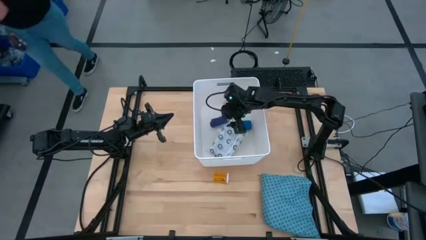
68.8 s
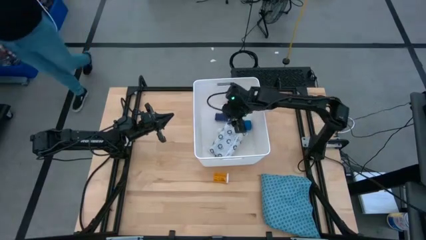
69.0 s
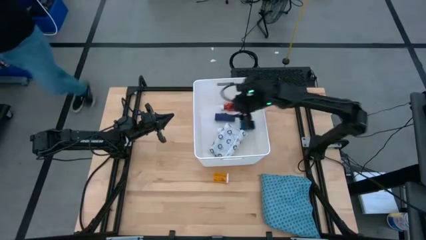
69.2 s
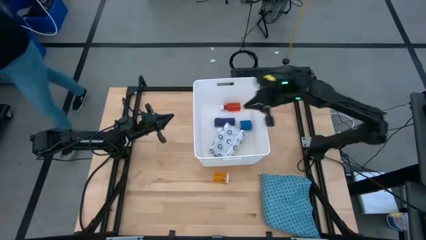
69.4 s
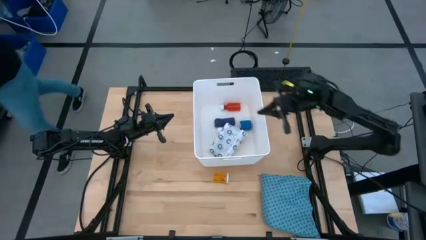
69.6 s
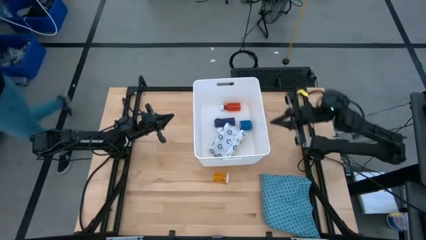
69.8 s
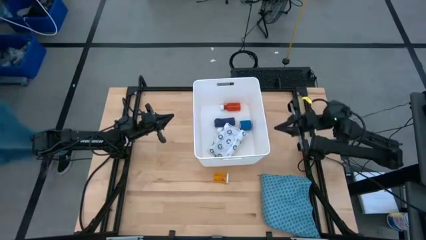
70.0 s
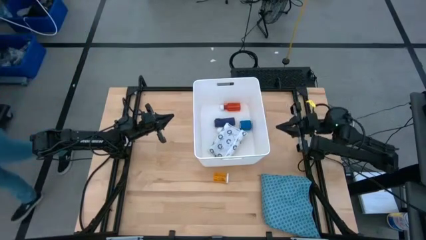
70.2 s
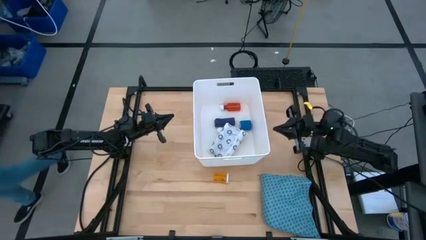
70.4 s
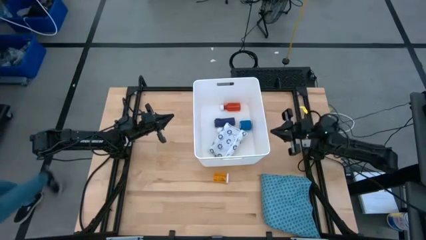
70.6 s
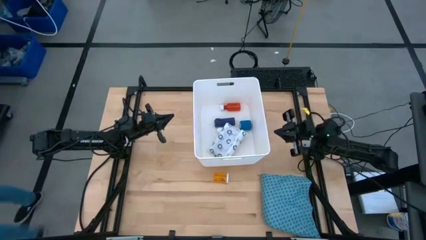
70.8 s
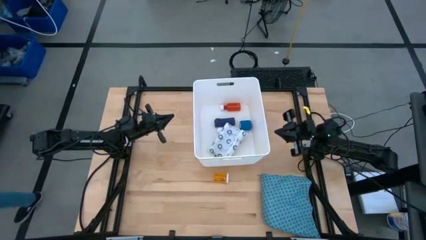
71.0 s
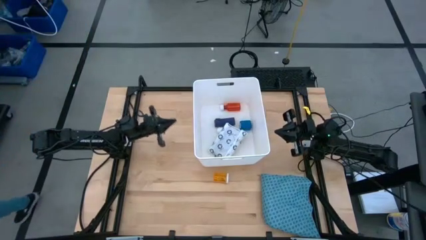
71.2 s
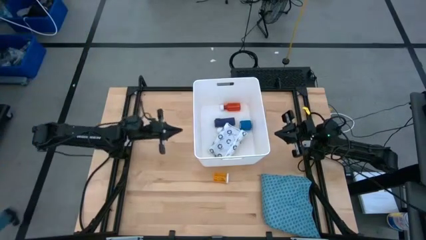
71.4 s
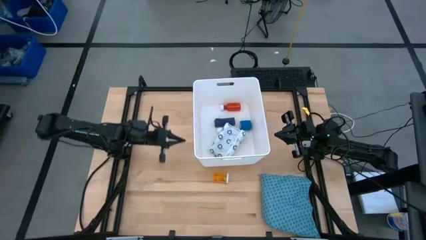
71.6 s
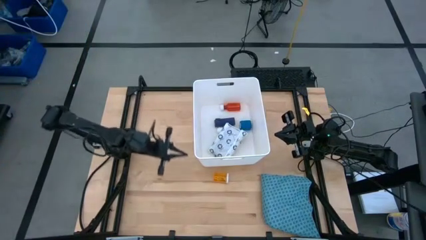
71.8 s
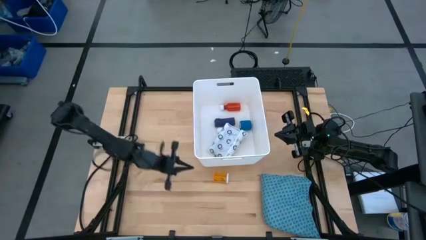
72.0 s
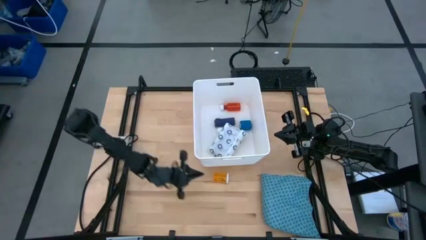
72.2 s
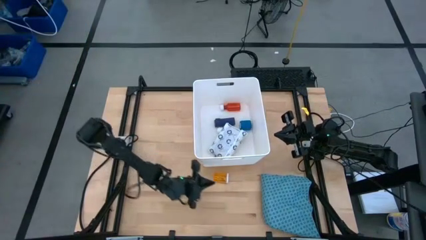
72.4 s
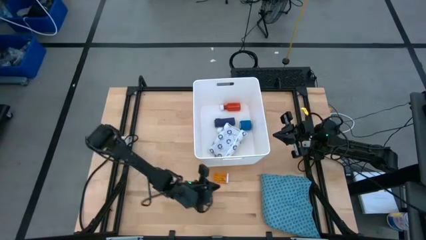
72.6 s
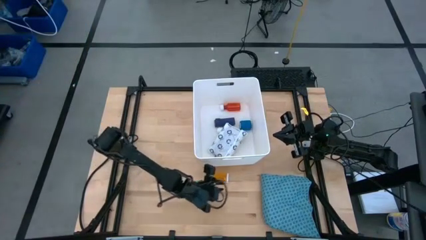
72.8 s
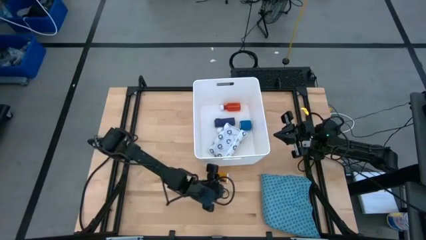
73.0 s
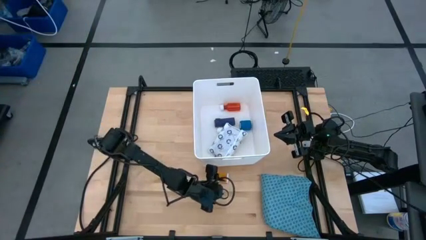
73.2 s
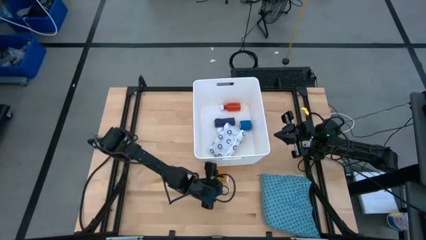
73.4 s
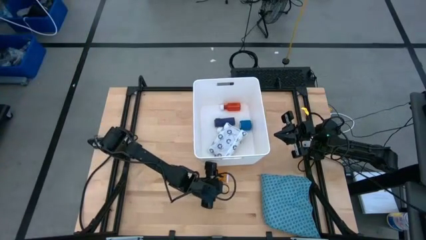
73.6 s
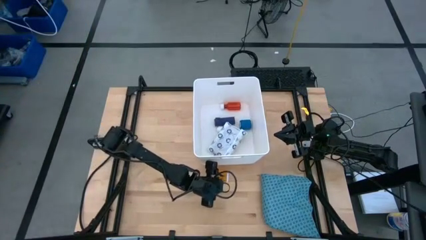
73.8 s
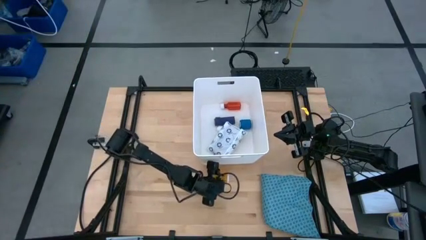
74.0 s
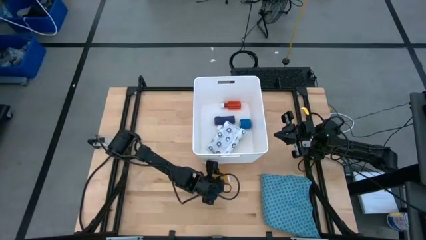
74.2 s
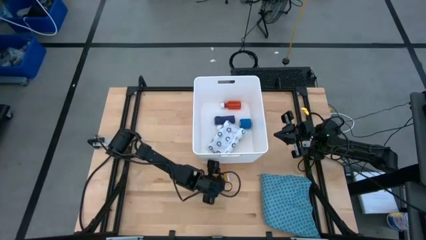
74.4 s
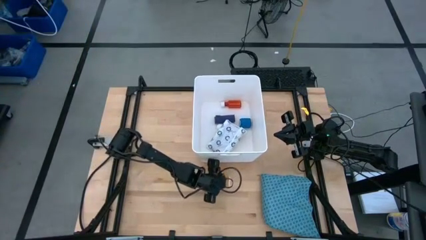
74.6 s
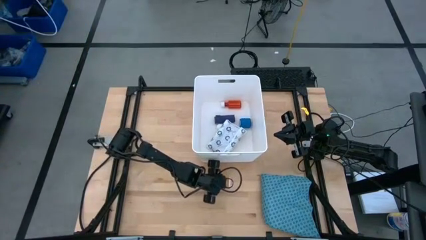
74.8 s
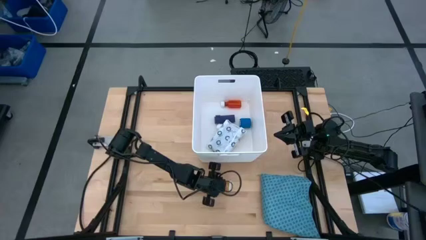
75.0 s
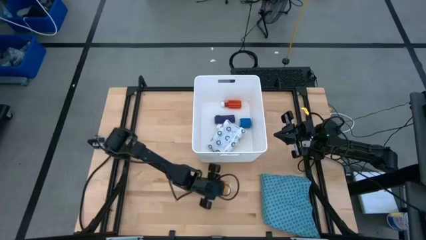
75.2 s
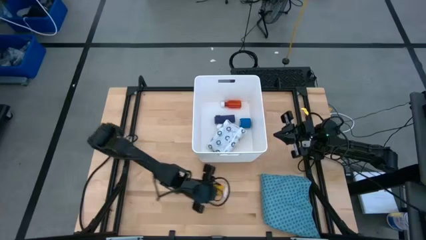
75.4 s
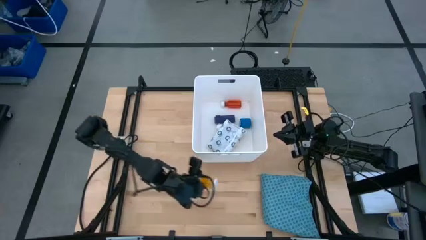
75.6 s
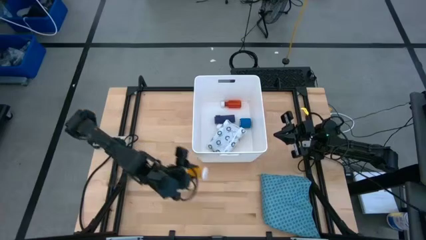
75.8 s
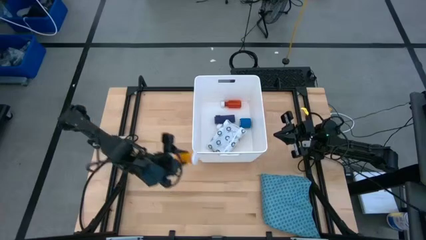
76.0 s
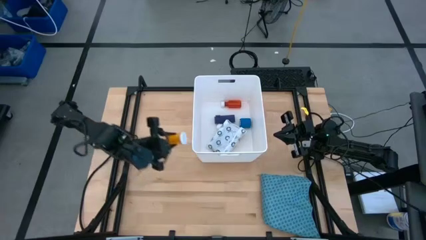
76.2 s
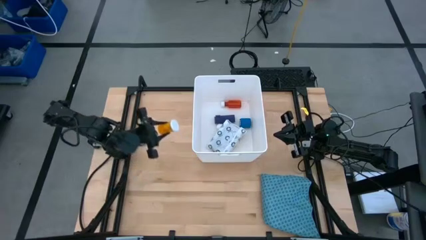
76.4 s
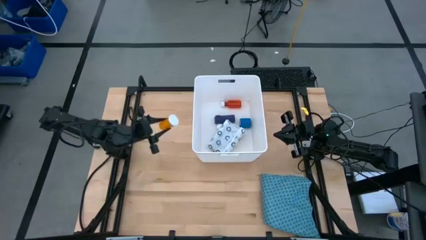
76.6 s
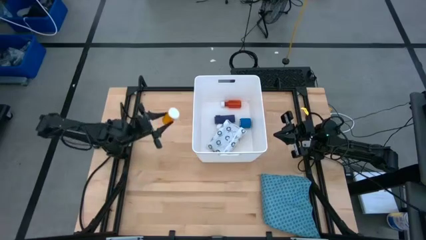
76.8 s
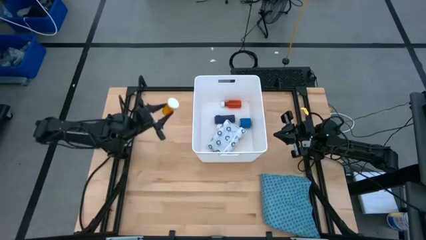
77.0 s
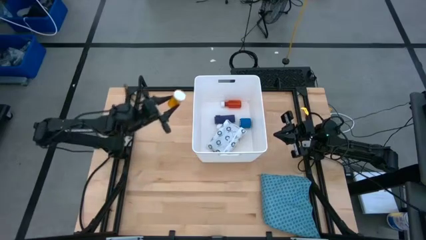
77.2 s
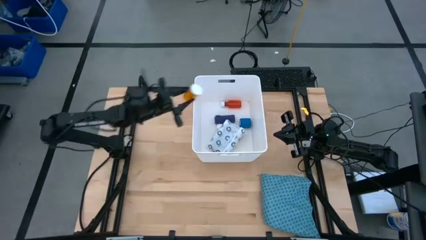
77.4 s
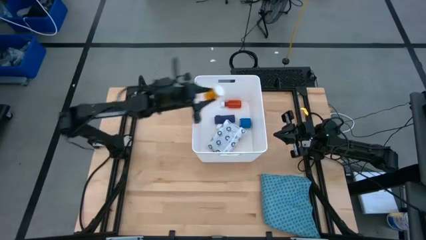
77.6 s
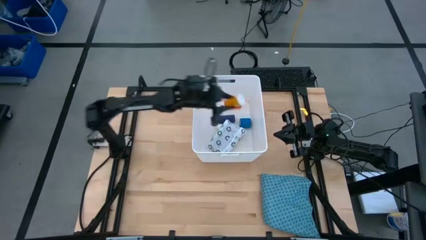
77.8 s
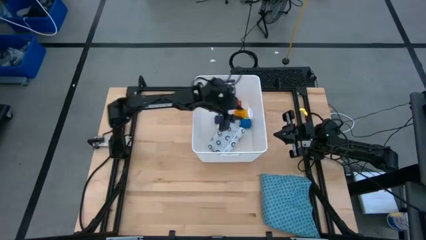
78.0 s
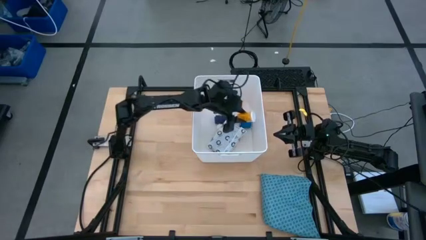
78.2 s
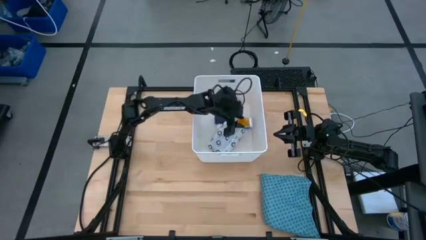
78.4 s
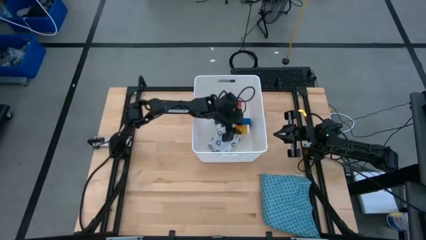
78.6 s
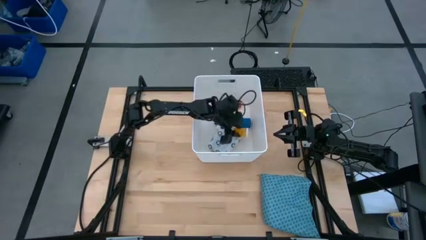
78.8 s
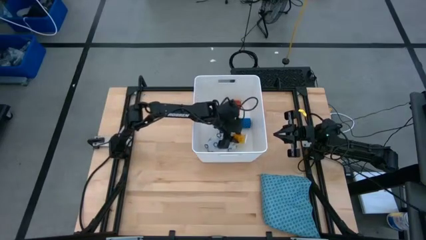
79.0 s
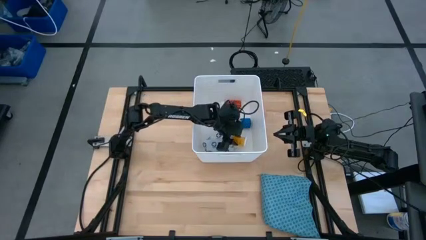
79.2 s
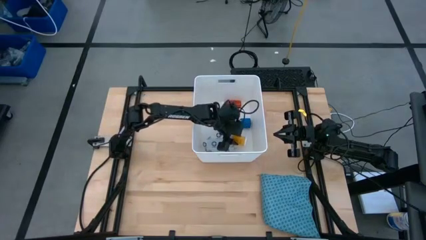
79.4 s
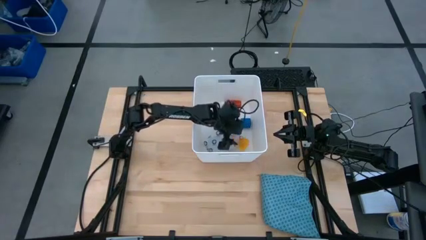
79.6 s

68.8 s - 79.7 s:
Task: Pick & place medical supplies in basket/bin
Put the orange pill bottle into the white container
